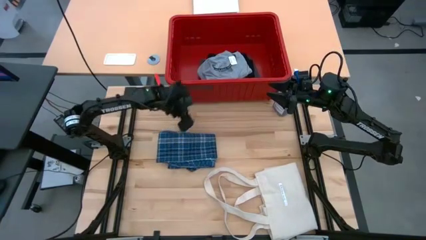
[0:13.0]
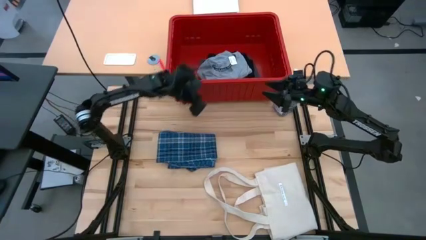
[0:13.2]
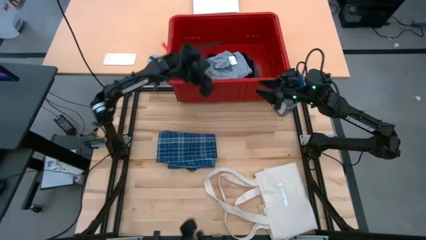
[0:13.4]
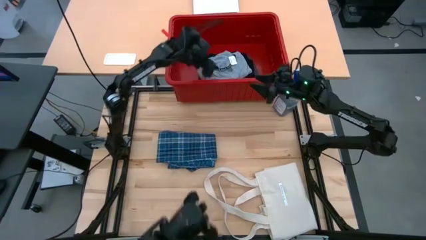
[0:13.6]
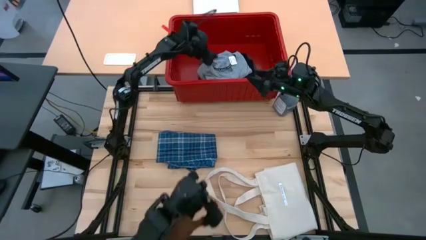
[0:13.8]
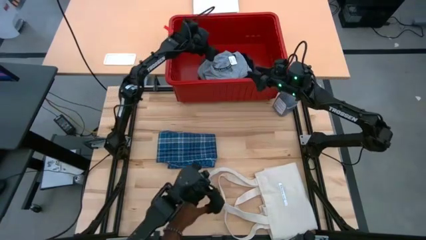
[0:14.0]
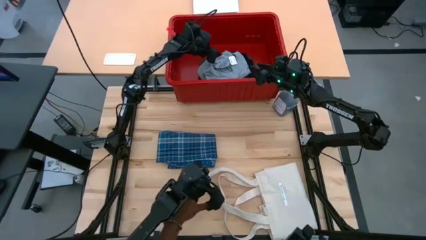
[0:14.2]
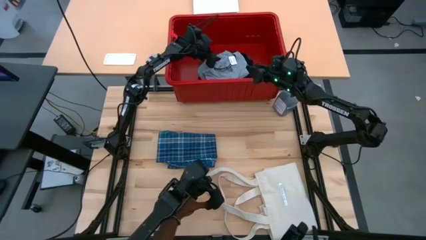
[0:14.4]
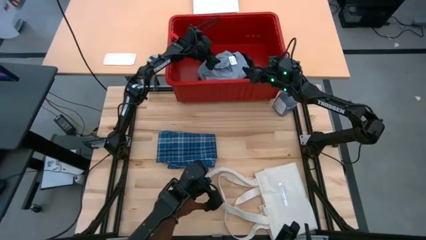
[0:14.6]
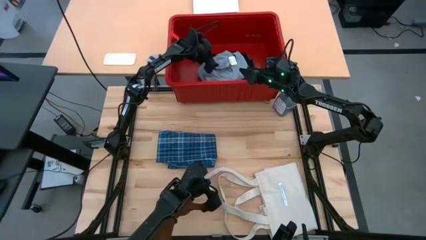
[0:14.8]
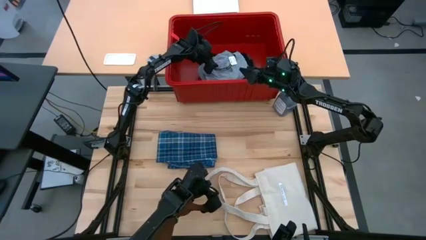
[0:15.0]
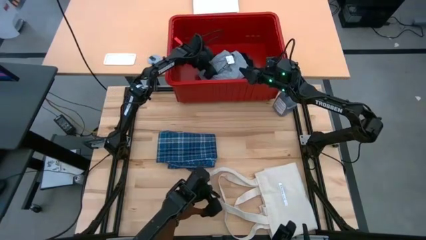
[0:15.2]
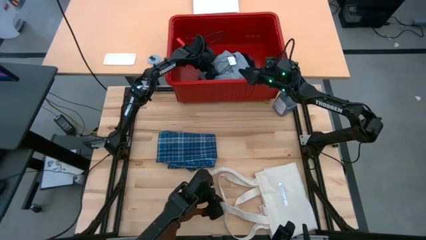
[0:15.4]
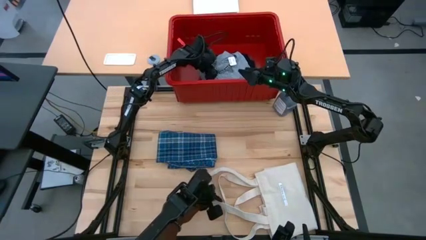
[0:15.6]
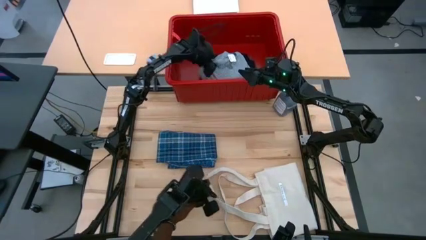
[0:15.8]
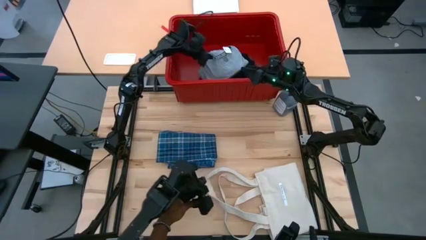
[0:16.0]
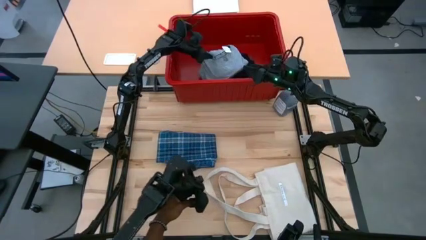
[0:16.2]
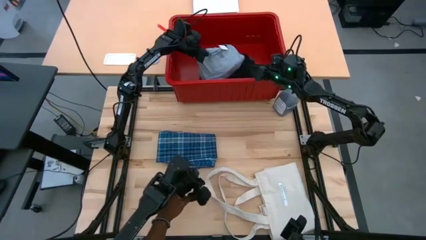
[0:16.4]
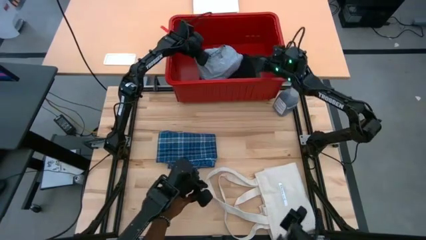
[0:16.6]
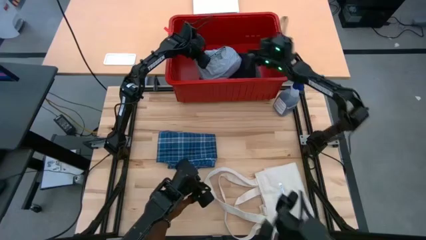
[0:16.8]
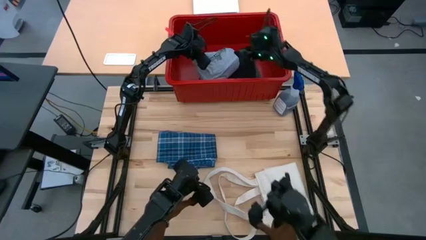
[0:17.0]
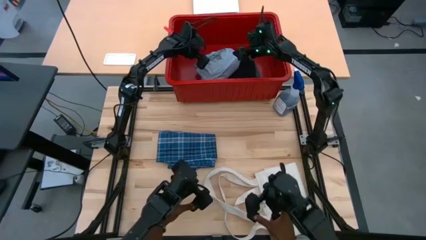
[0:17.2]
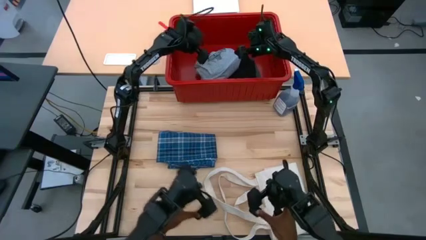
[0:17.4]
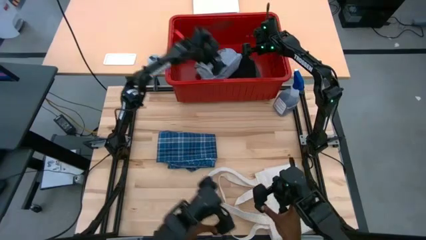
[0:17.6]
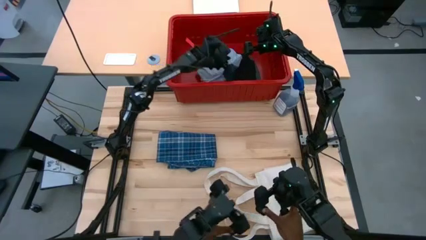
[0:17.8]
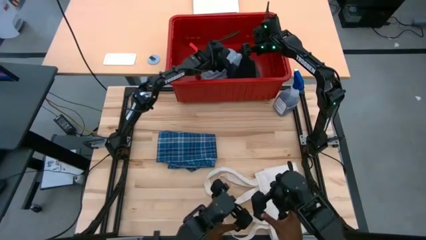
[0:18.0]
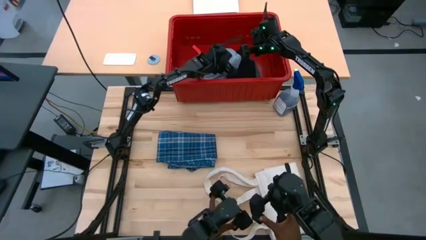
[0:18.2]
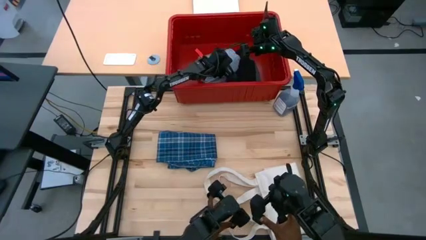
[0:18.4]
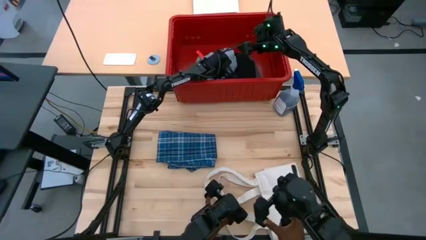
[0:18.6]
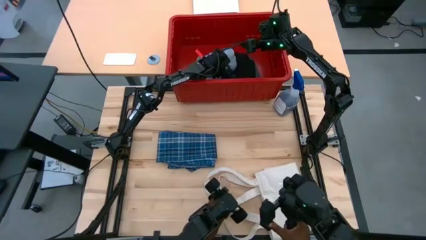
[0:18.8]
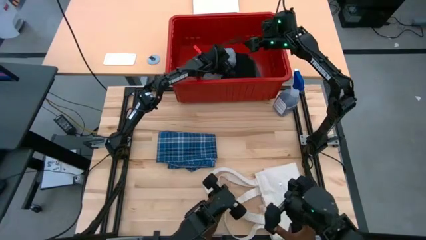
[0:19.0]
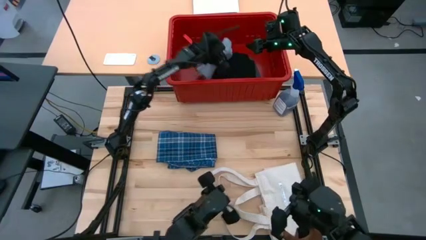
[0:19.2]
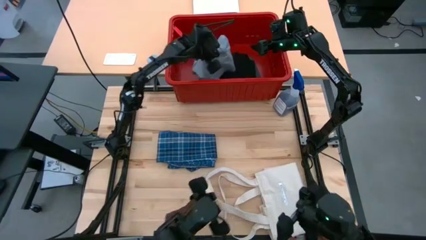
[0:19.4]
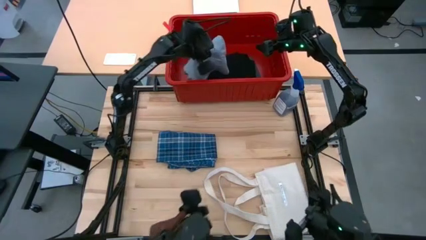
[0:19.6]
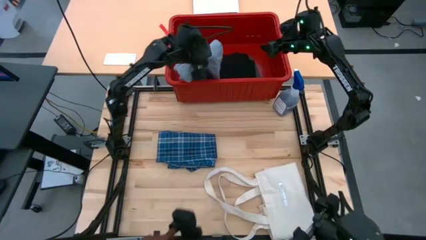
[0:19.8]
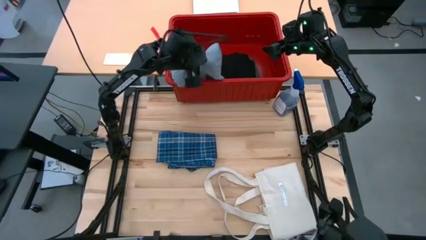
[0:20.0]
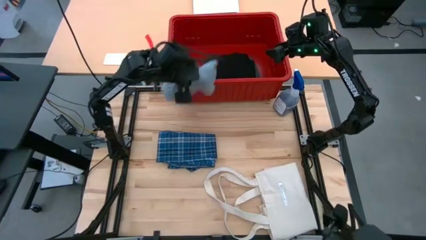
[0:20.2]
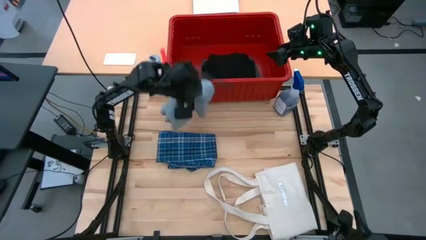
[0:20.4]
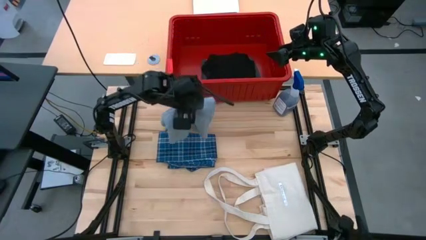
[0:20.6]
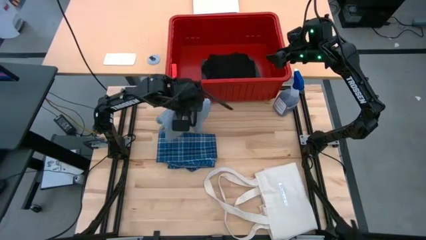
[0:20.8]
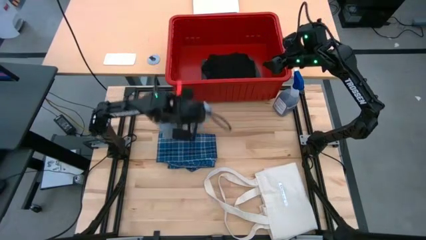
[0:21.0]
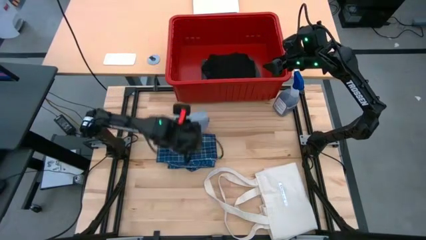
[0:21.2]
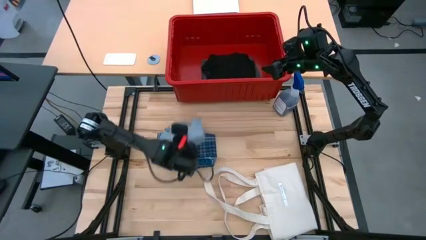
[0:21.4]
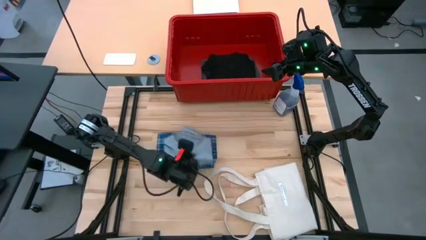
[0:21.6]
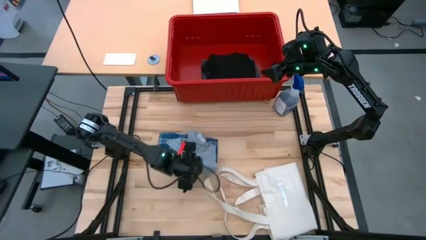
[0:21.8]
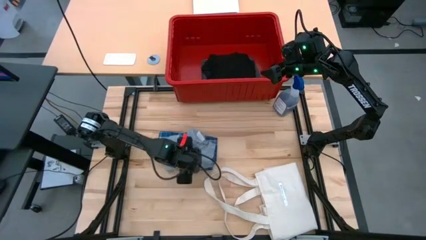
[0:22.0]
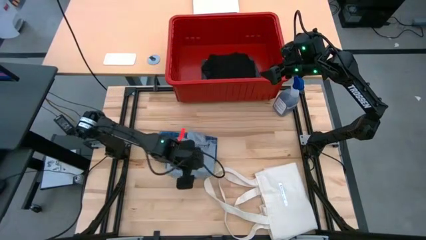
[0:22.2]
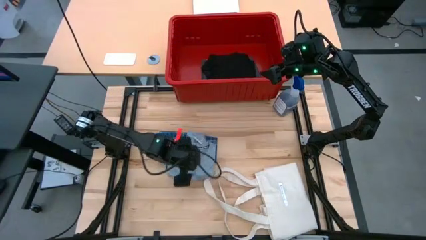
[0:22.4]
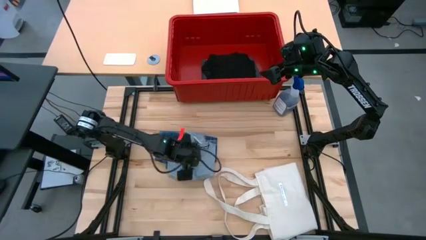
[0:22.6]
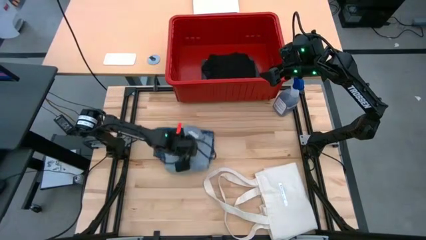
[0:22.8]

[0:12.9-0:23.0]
Task: Fold laundry
Remove the gray shirt from the red organizer bin

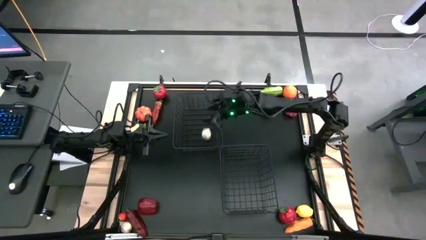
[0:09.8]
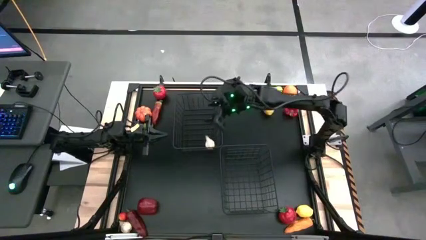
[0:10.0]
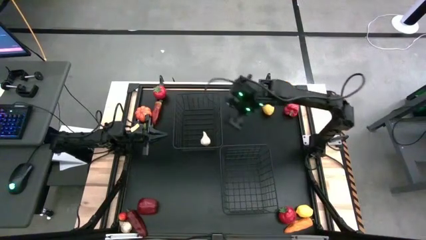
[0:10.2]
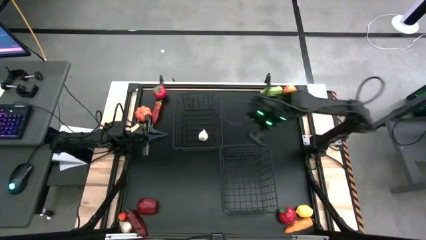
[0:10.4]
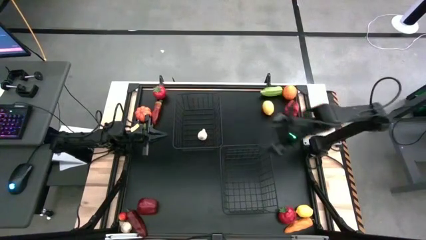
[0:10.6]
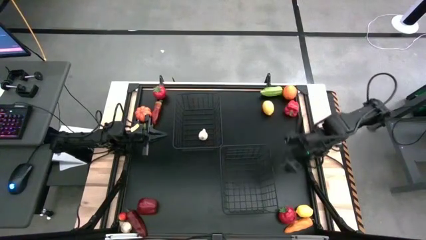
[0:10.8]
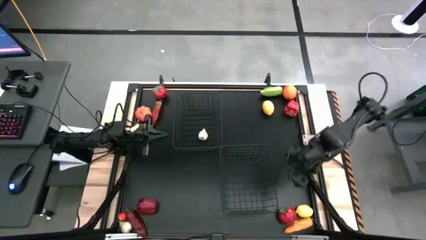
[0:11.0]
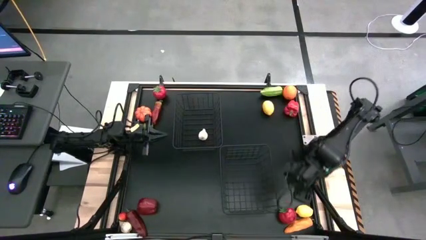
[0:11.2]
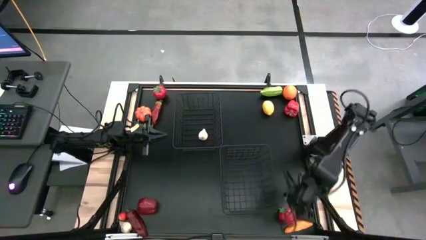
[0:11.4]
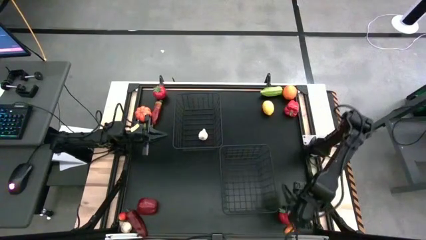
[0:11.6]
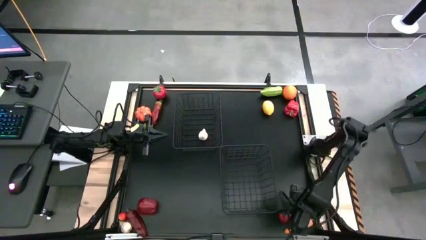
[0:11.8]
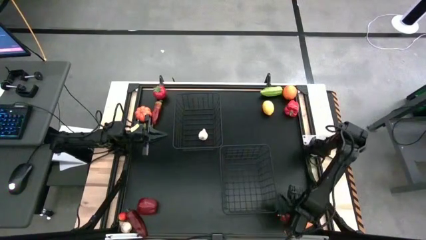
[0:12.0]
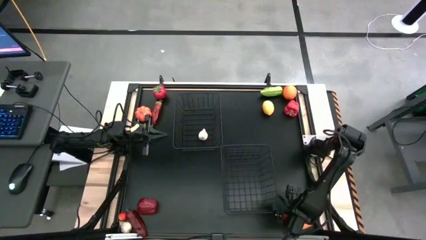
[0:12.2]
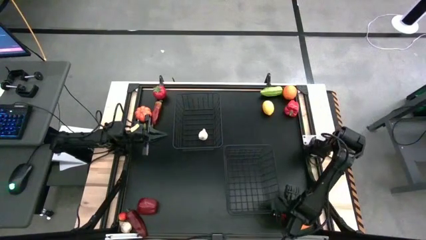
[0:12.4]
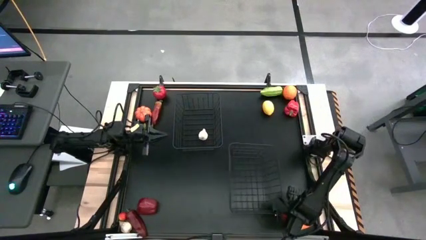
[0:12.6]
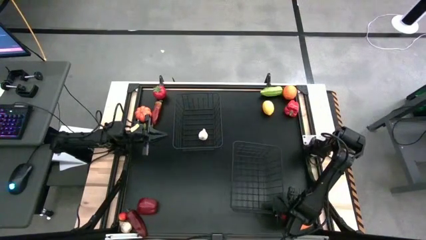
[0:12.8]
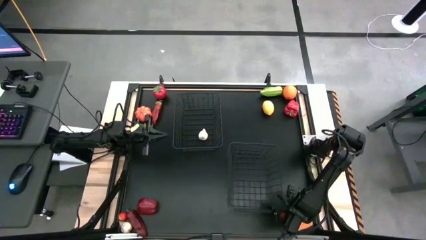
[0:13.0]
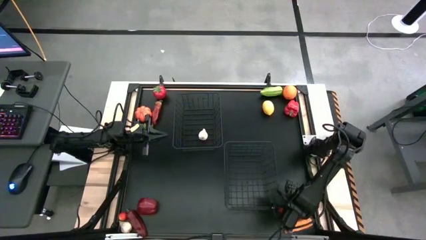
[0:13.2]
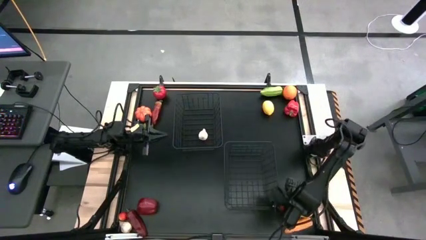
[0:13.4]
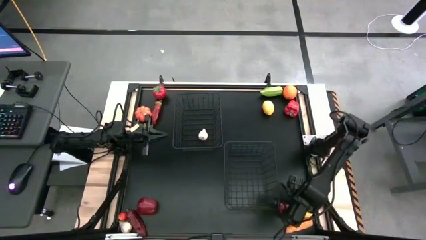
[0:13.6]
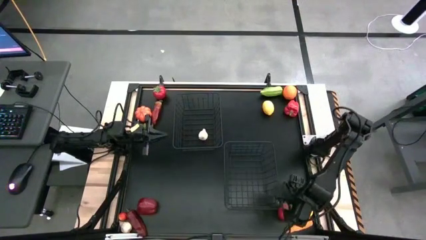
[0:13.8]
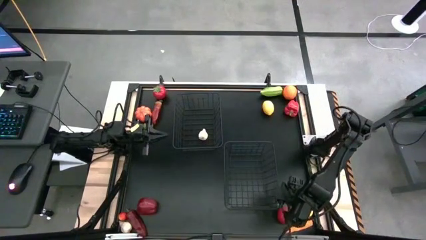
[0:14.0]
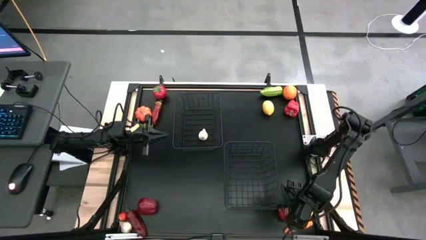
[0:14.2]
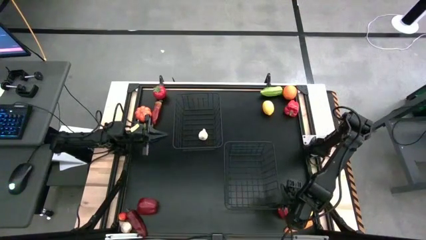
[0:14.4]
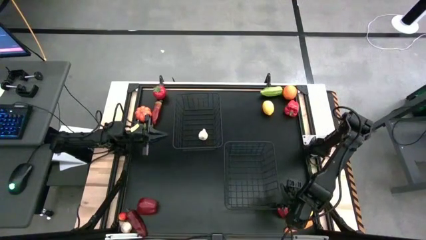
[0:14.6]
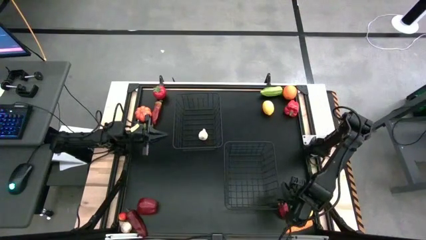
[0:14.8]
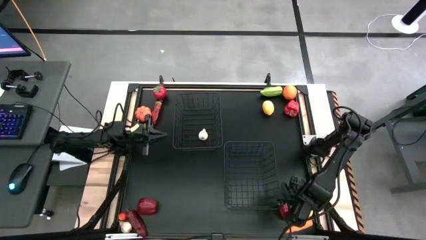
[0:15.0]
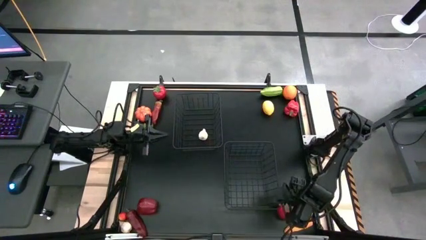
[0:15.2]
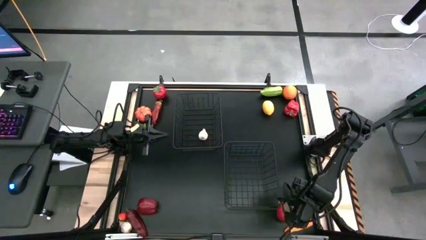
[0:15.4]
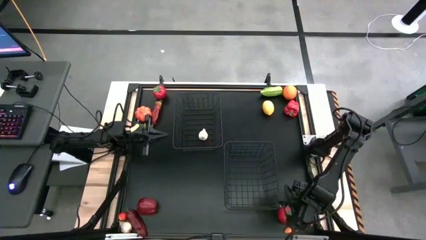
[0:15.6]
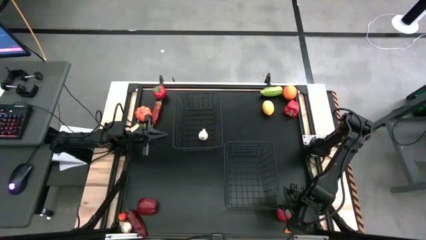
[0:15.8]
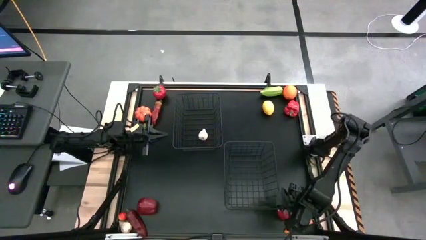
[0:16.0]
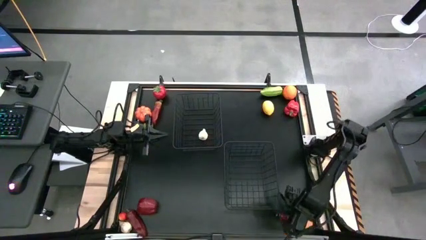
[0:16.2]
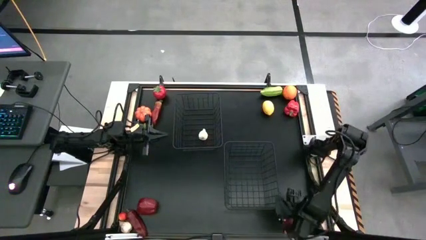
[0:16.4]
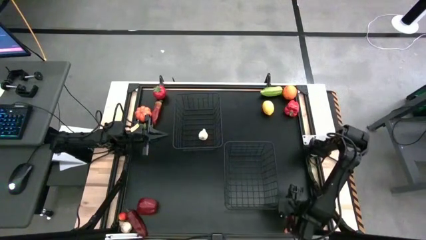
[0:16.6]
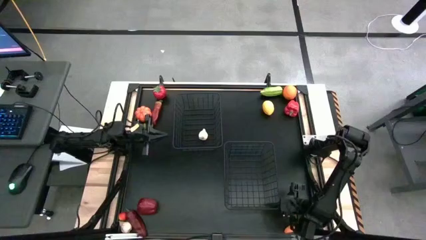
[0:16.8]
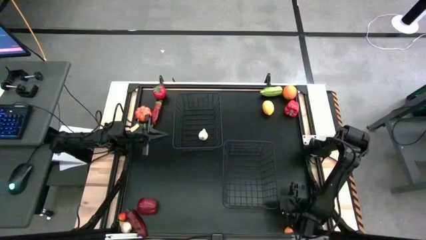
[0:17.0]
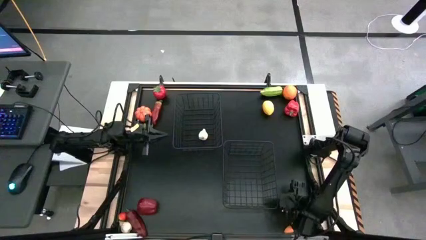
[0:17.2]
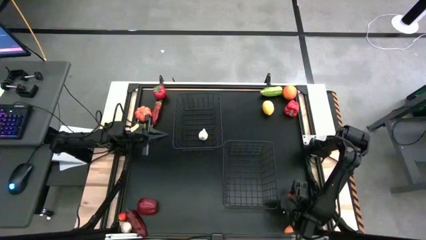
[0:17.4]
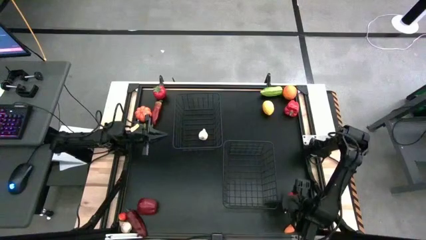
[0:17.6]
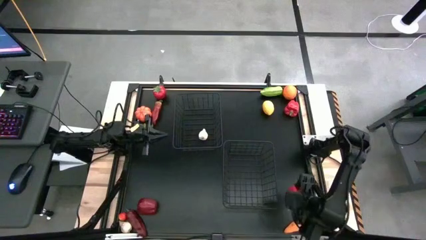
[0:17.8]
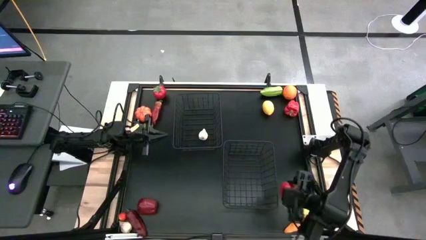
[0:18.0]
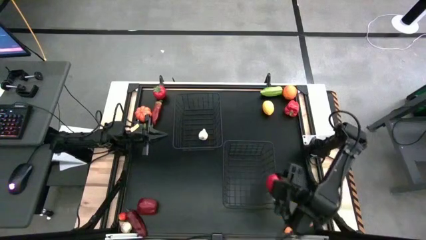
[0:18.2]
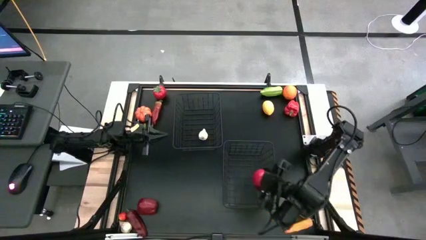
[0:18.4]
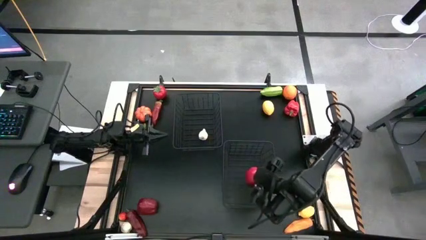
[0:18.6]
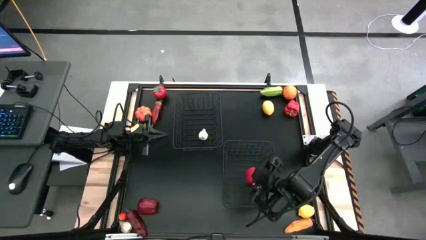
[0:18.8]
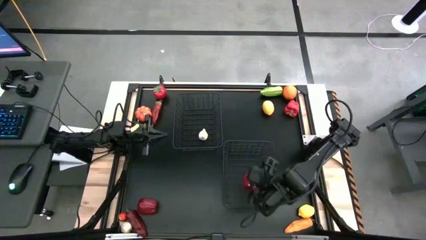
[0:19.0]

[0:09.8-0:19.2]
Task: Sort produce into baskets
Put the bottom right red tomato into the bottom black wire basket
